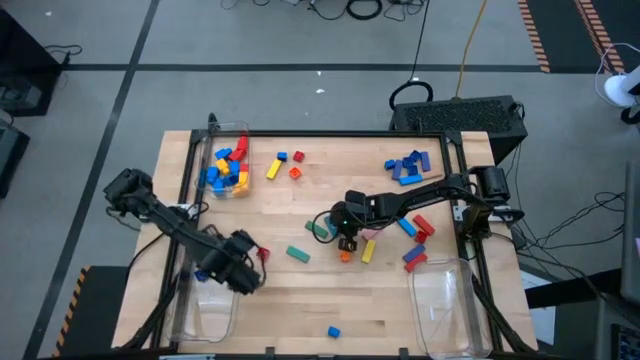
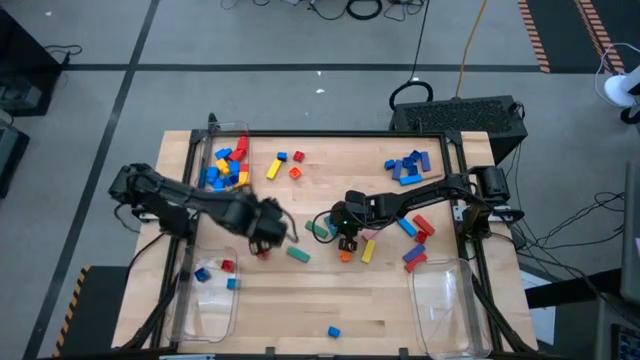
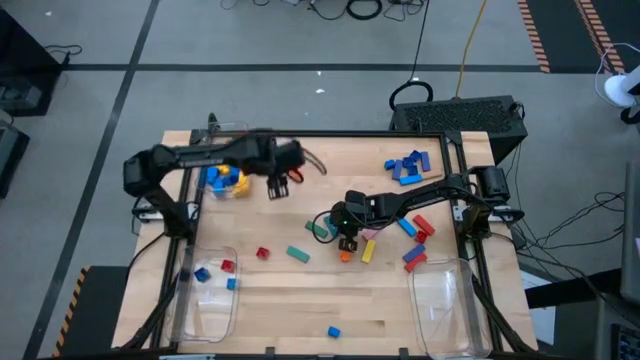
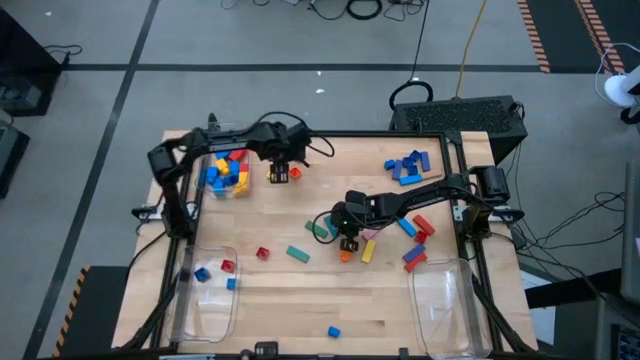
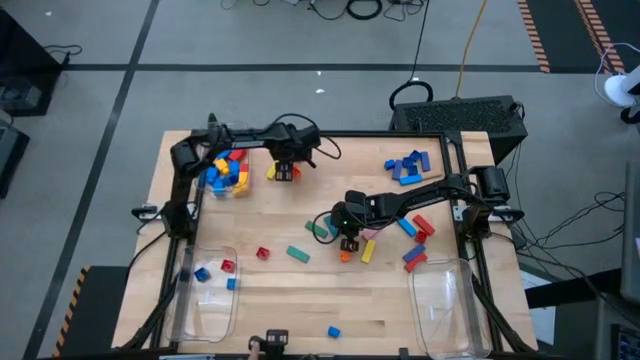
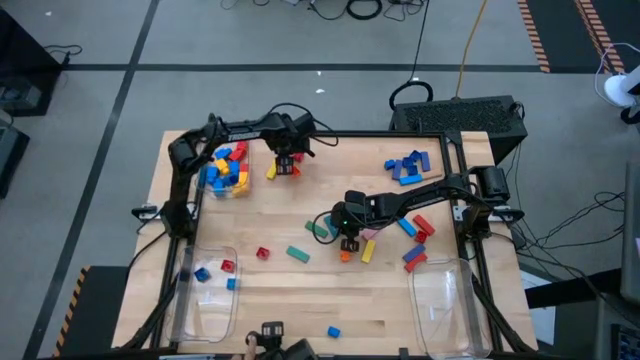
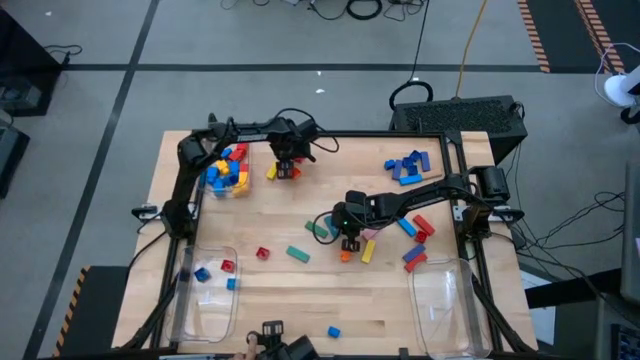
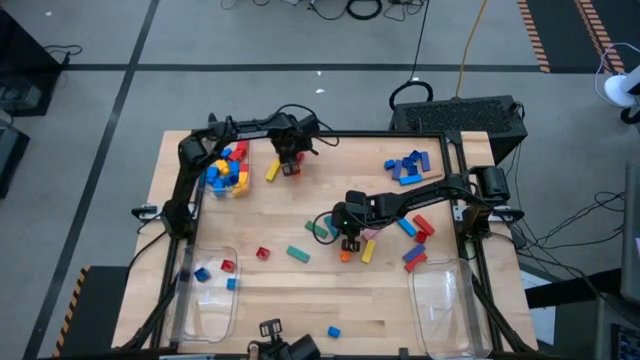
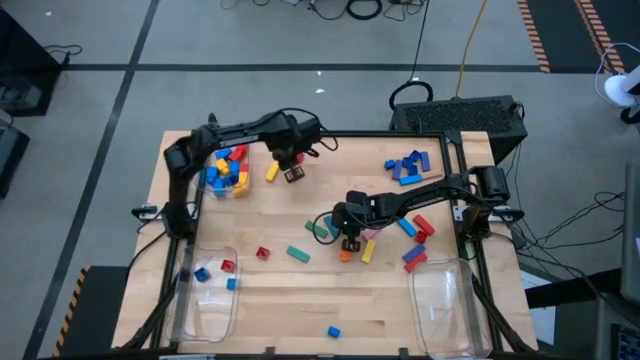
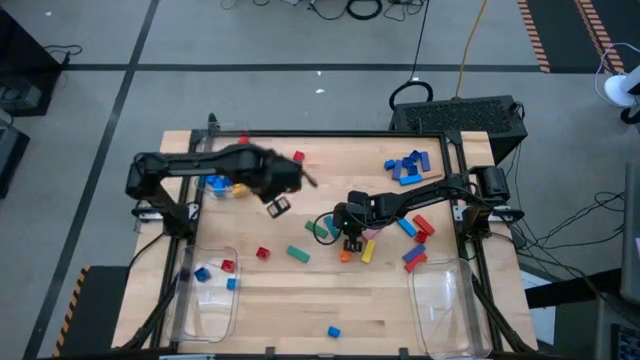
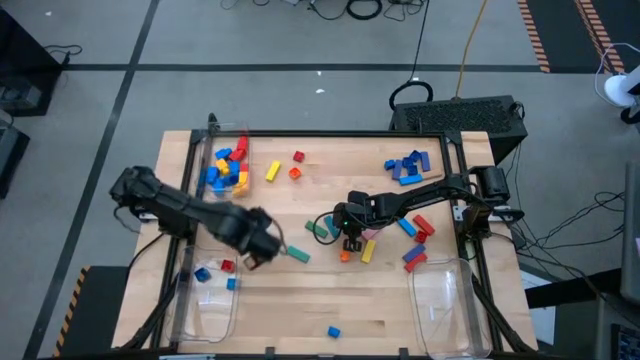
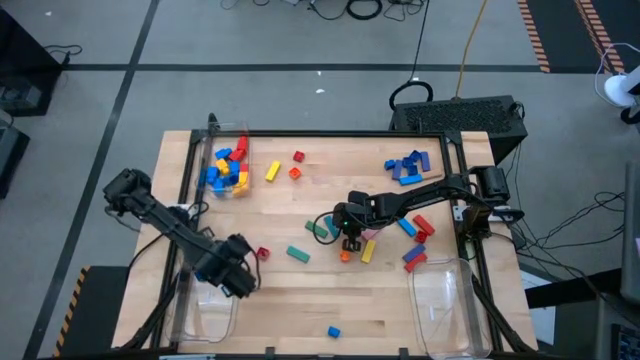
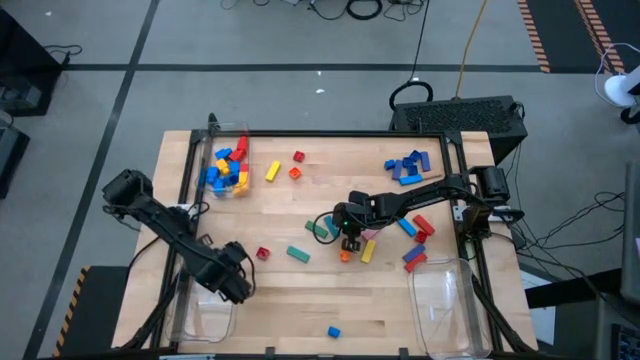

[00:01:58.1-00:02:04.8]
Task: Sort blocks by size
Put the blue four stud game piece into the bottom left transparent bin

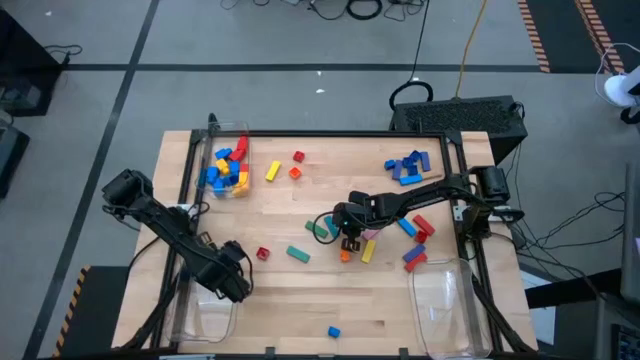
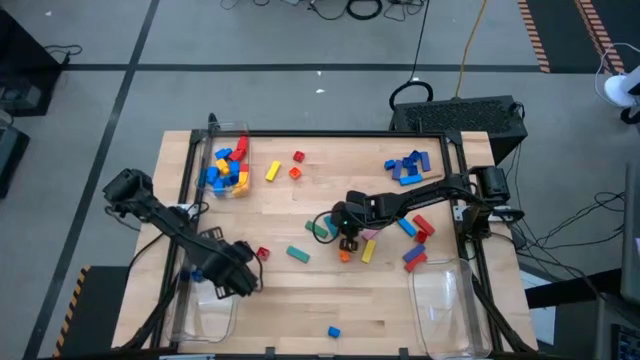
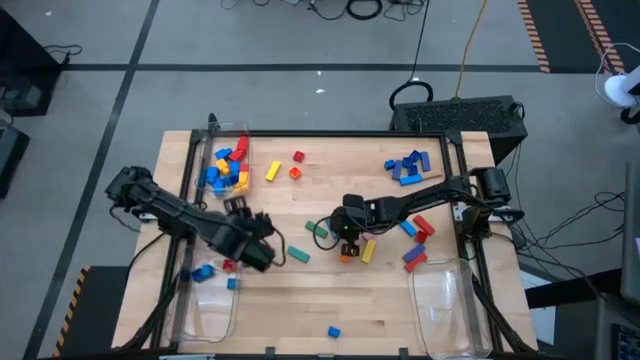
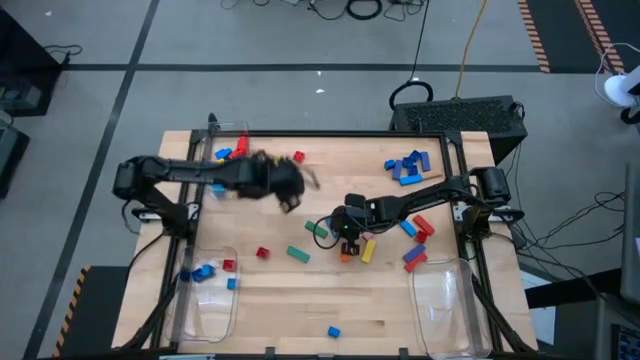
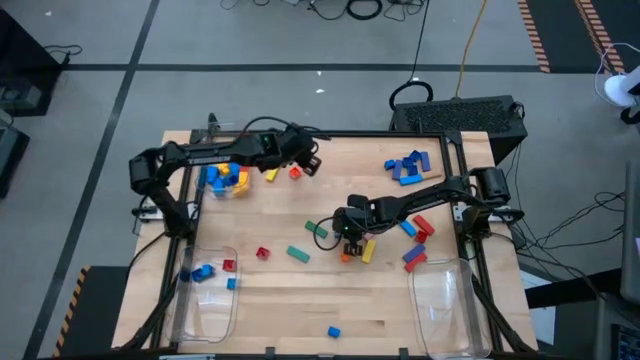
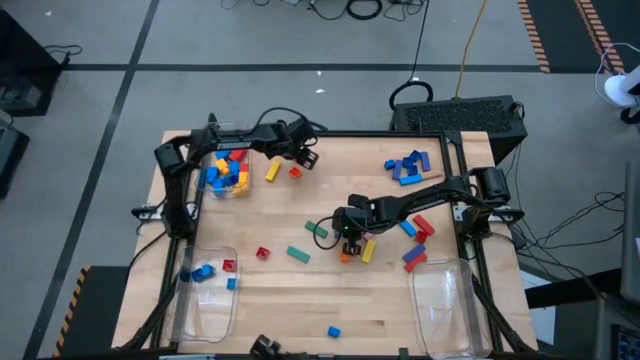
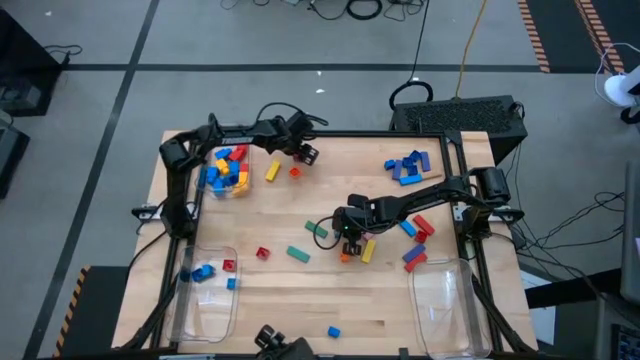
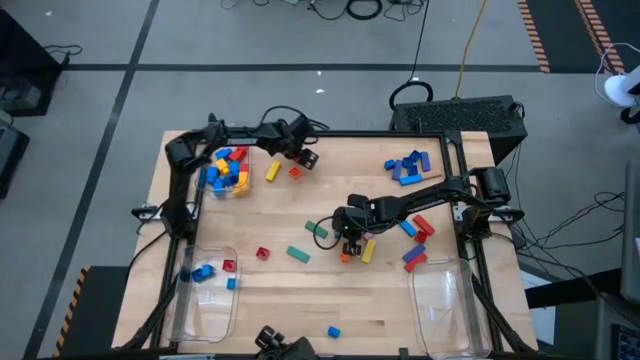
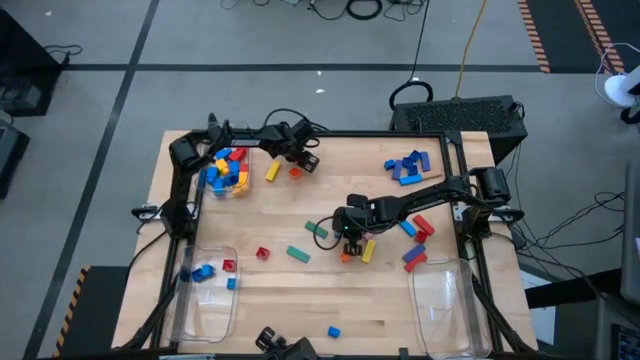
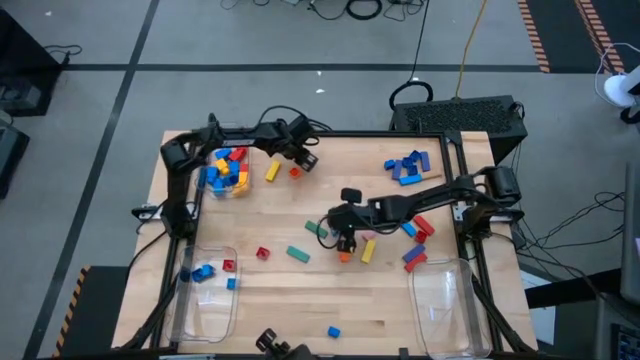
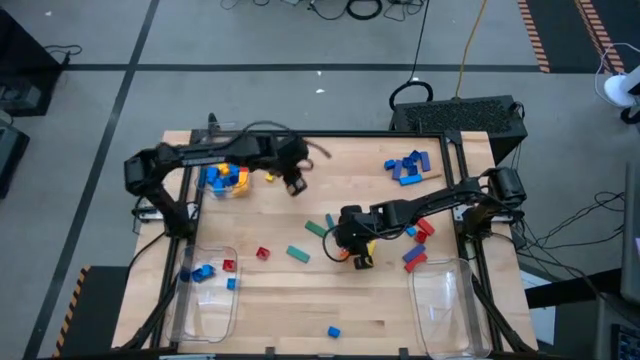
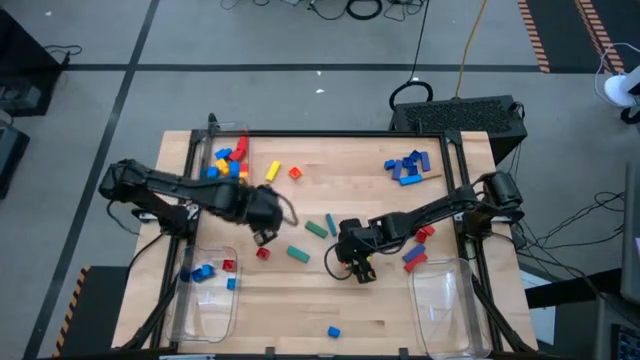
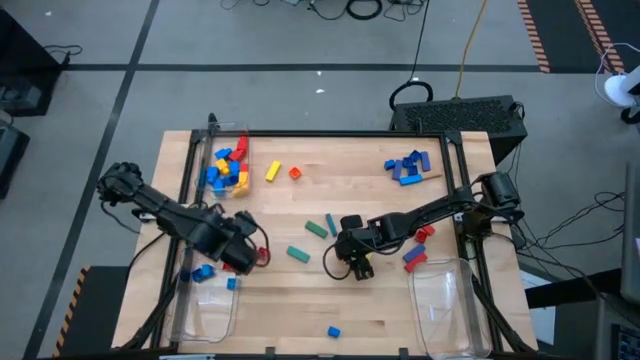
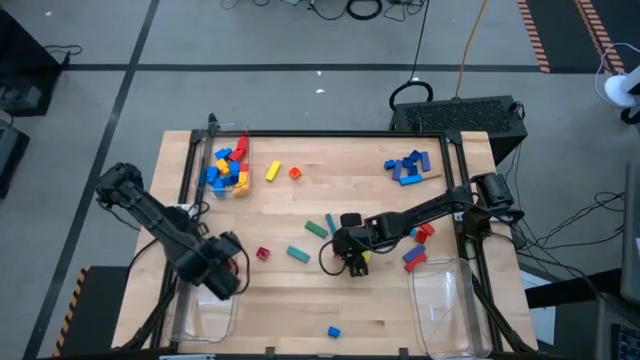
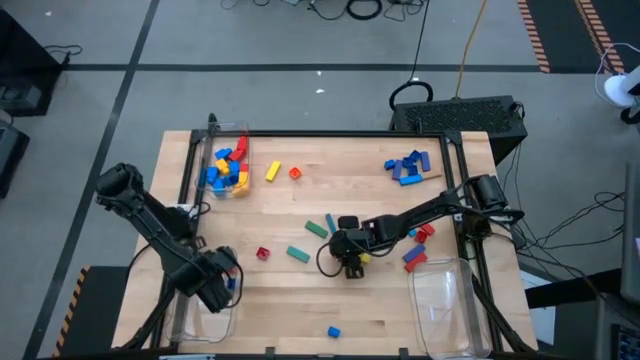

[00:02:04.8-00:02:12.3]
Put the red four stud game piece into the bottom left transparent bin

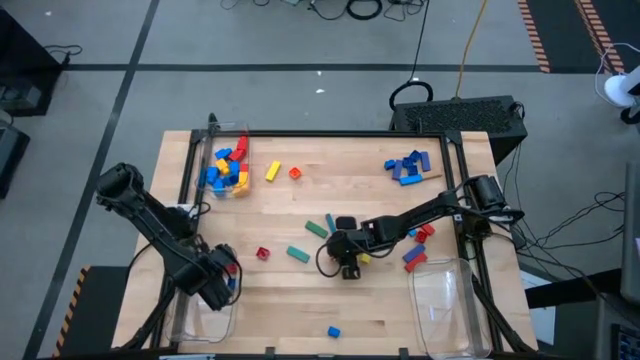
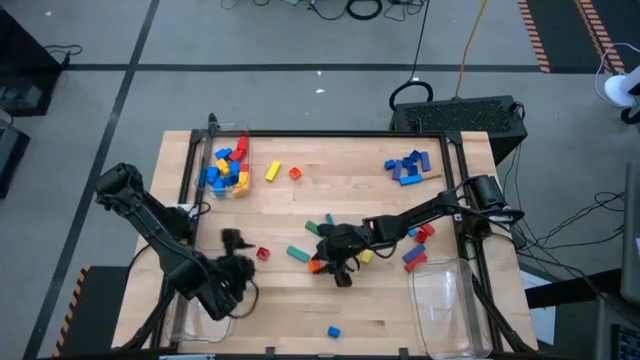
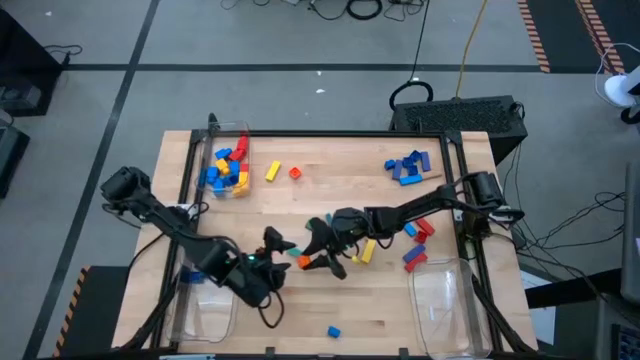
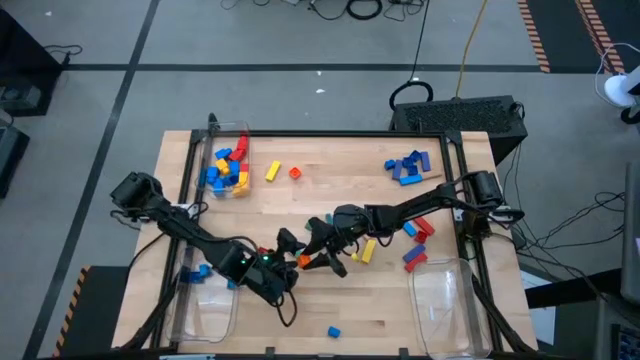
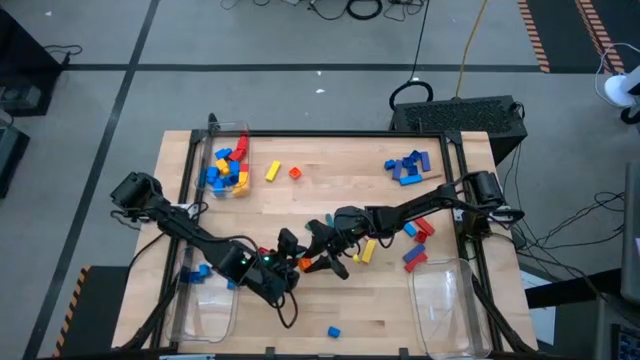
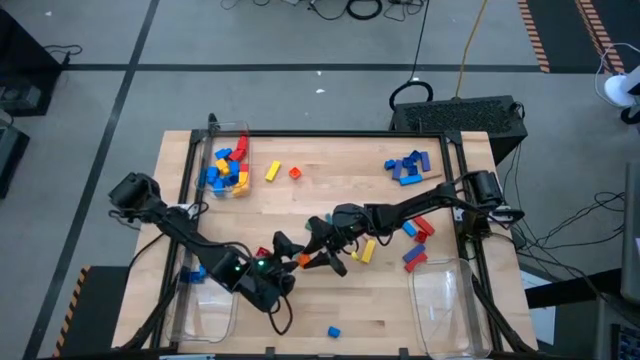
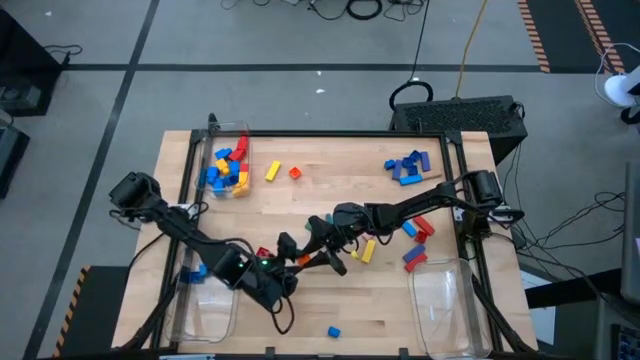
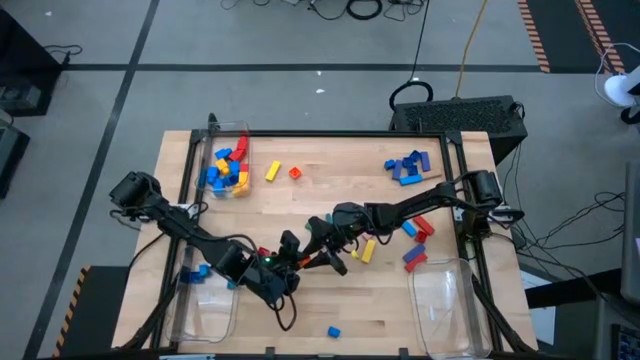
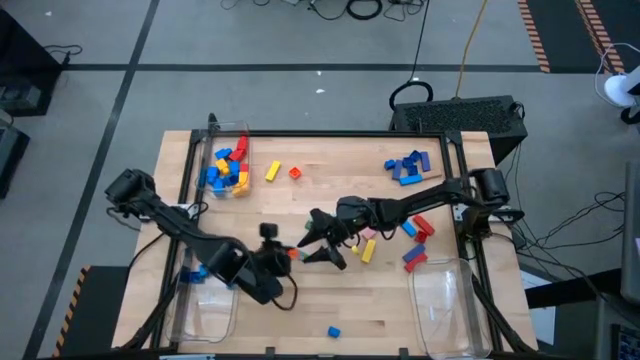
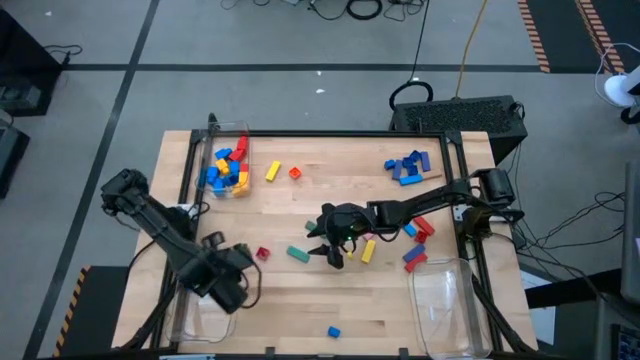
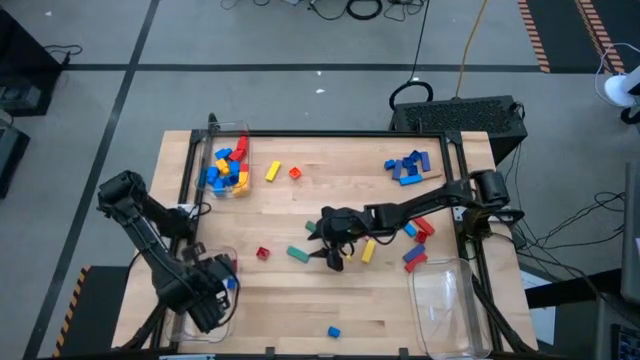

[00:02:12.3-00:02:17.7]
Put the orange four stud game piece into the bottom left transparent bin

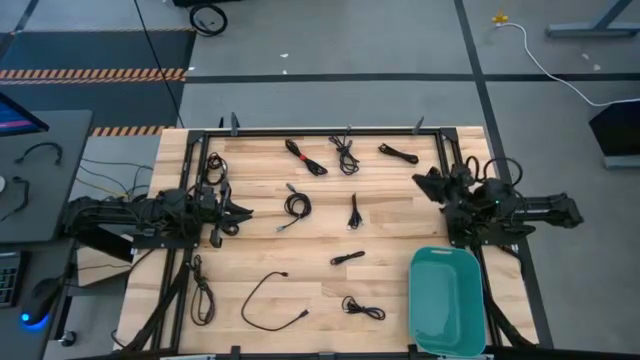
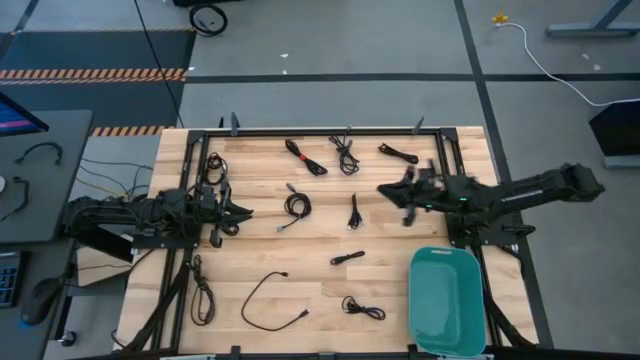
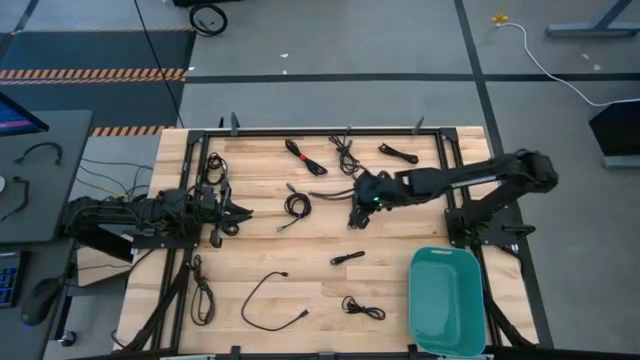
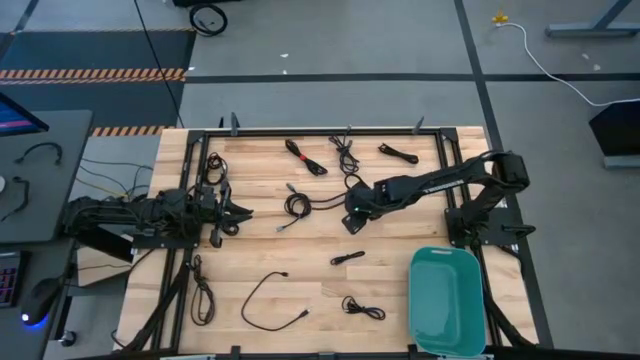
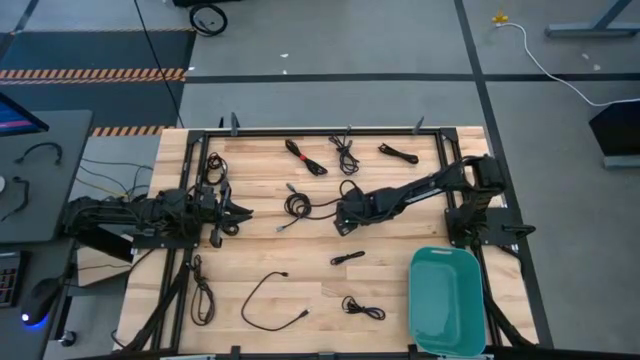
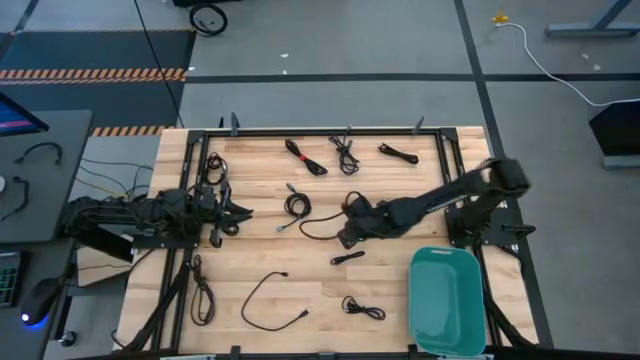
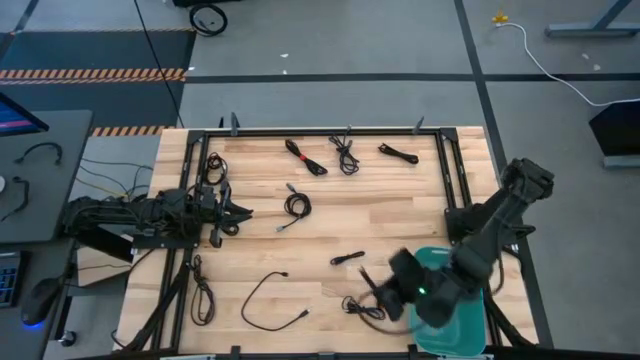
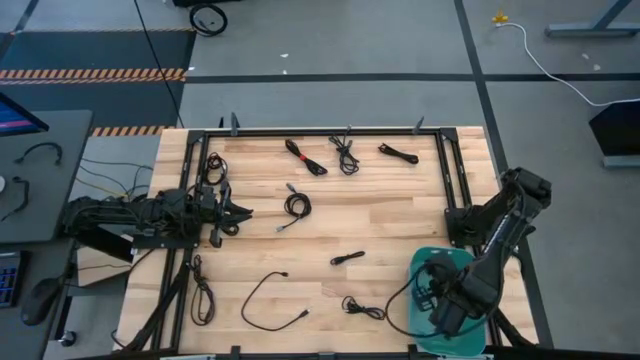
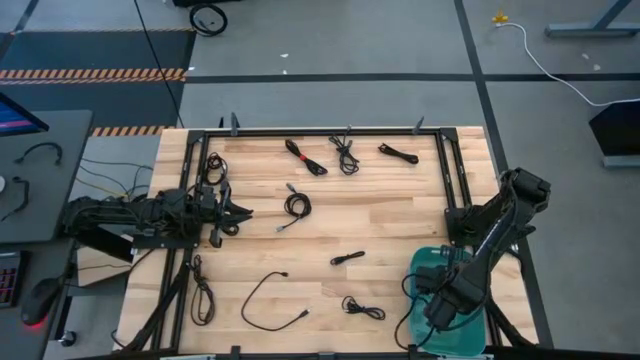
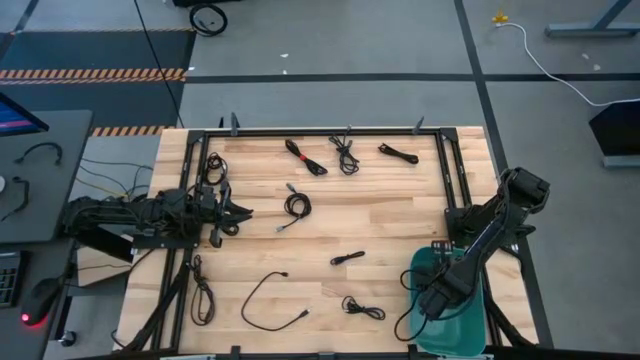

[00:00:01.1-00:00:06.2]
Task: Pick and place USB-C Cables
Put the black charger cable into the blue bin
